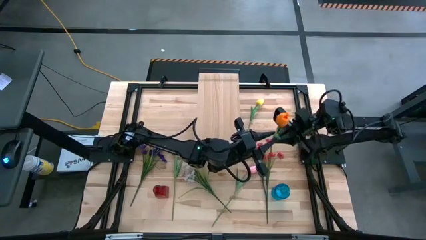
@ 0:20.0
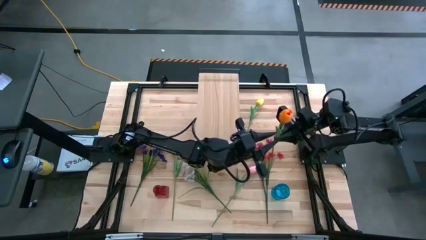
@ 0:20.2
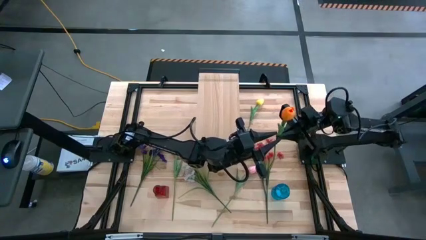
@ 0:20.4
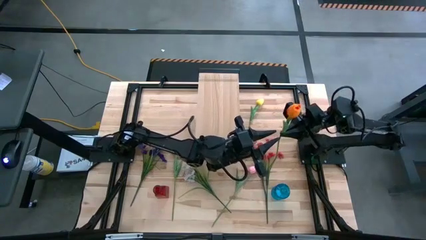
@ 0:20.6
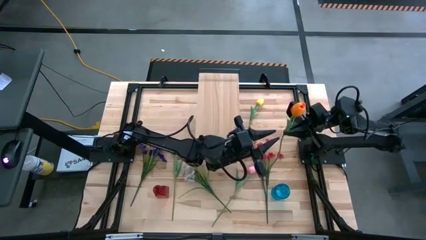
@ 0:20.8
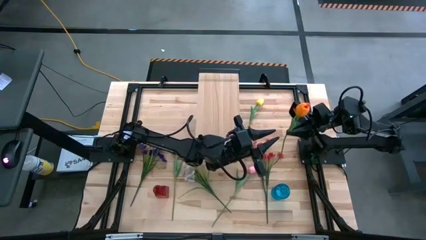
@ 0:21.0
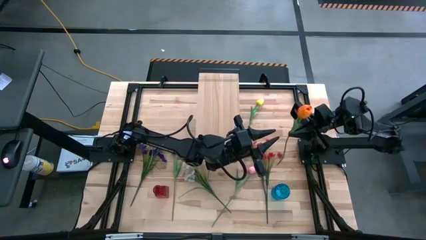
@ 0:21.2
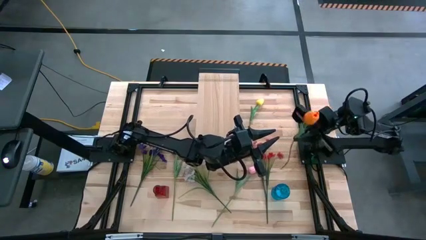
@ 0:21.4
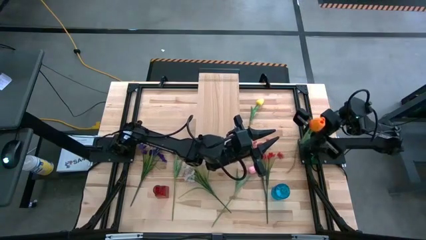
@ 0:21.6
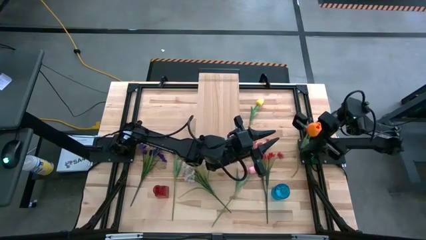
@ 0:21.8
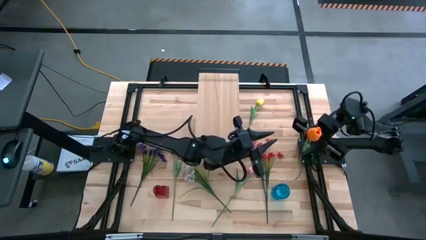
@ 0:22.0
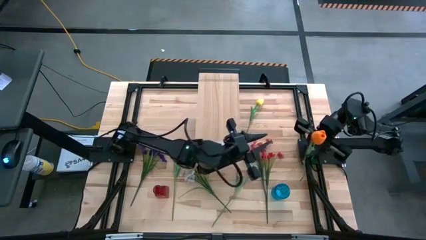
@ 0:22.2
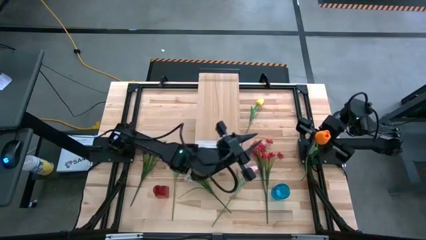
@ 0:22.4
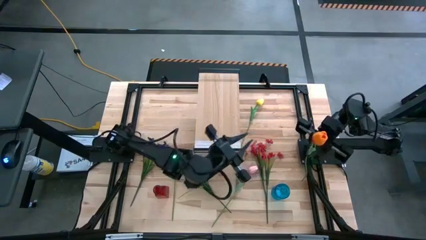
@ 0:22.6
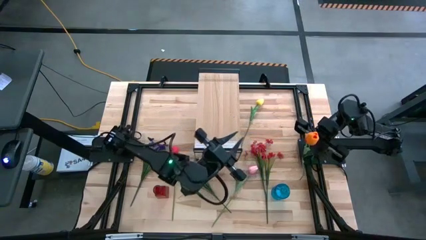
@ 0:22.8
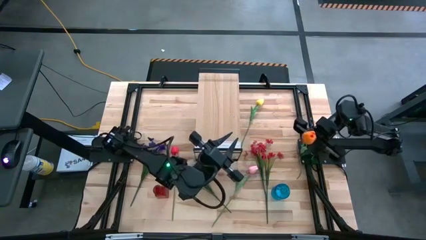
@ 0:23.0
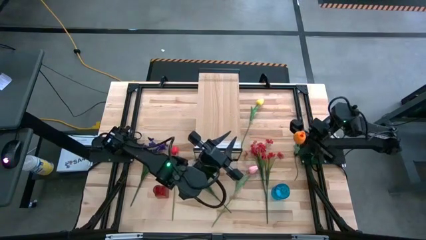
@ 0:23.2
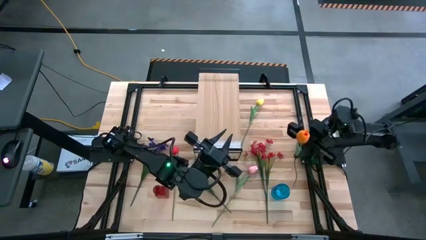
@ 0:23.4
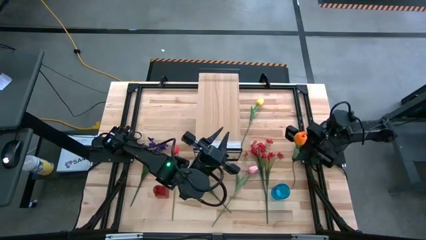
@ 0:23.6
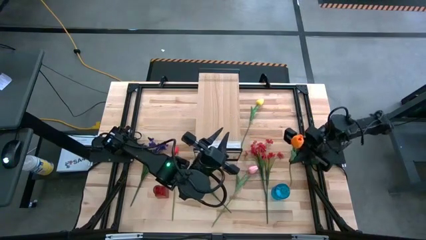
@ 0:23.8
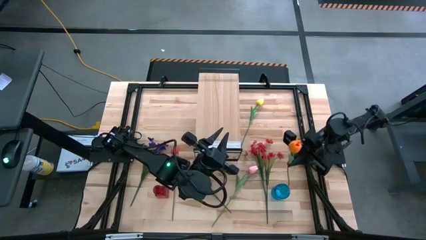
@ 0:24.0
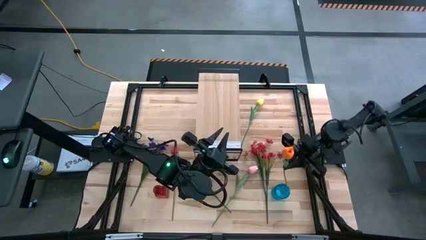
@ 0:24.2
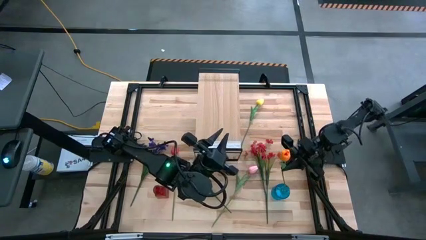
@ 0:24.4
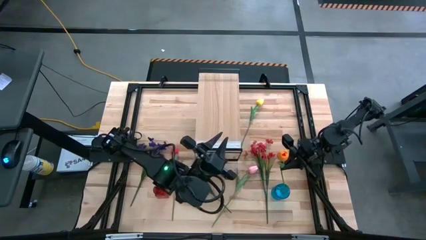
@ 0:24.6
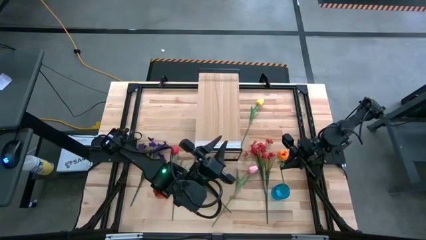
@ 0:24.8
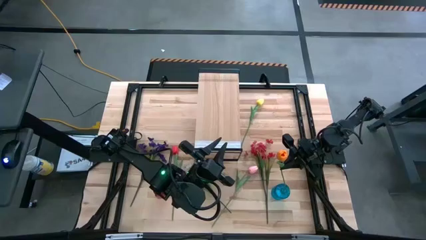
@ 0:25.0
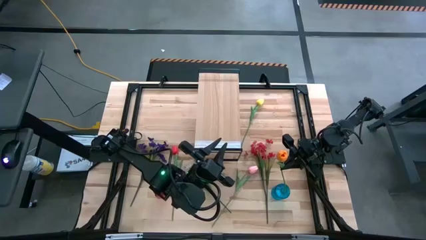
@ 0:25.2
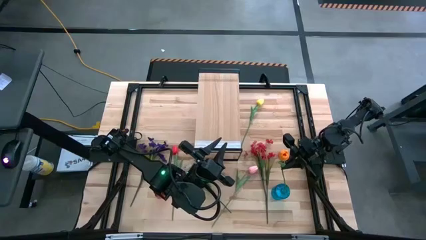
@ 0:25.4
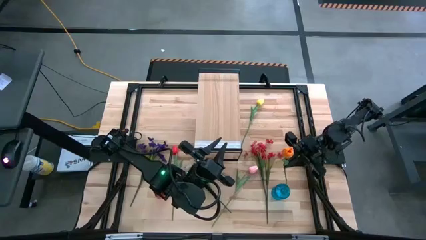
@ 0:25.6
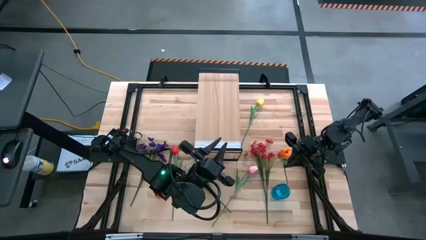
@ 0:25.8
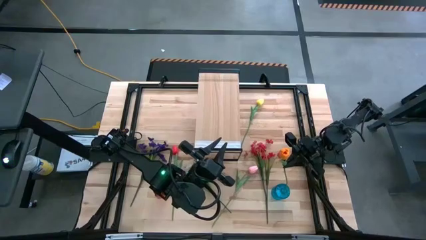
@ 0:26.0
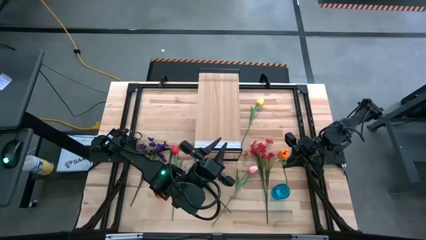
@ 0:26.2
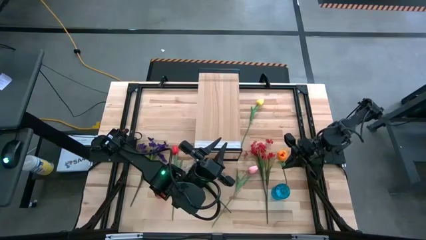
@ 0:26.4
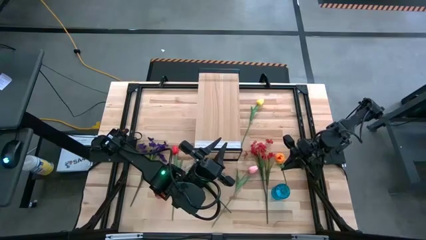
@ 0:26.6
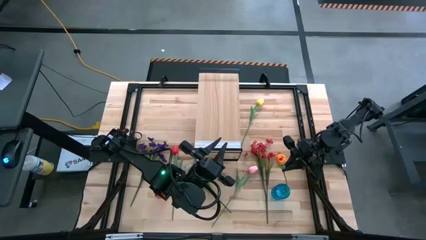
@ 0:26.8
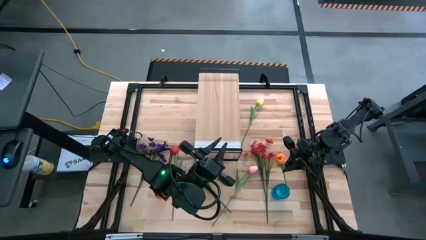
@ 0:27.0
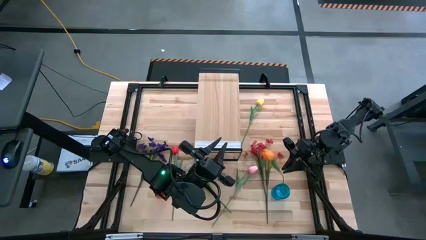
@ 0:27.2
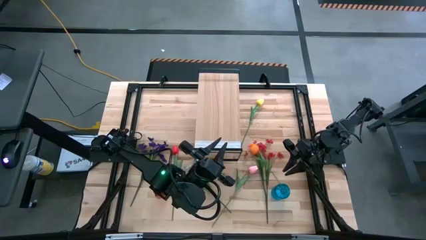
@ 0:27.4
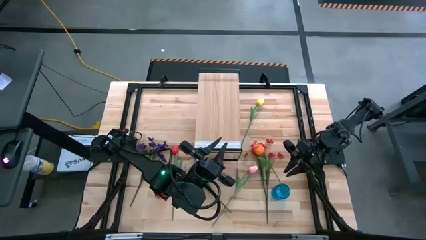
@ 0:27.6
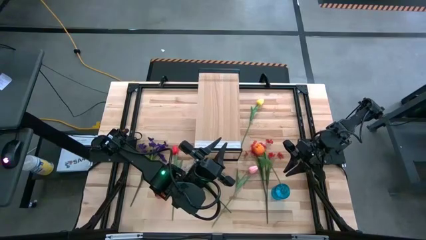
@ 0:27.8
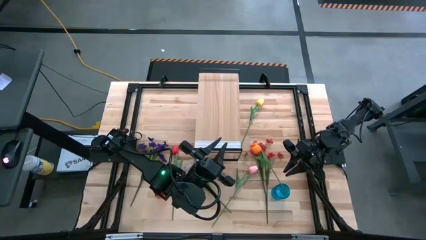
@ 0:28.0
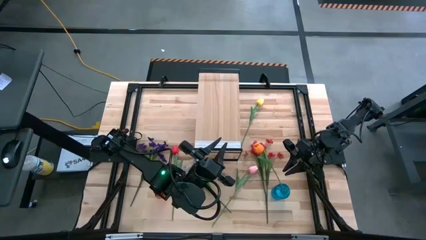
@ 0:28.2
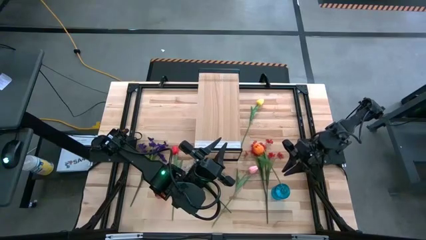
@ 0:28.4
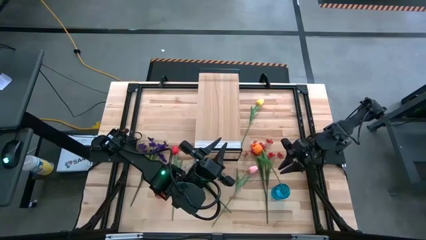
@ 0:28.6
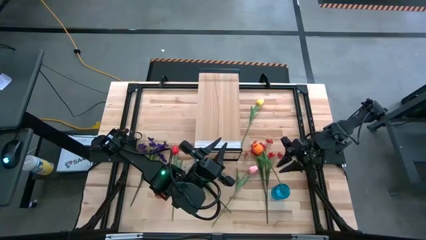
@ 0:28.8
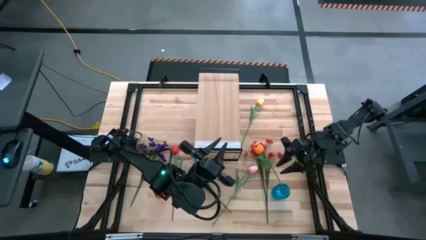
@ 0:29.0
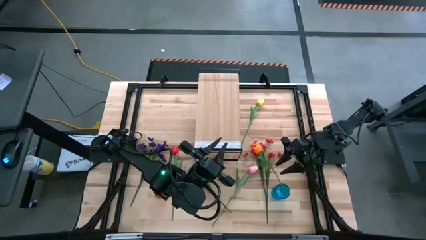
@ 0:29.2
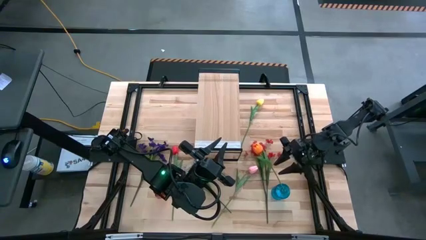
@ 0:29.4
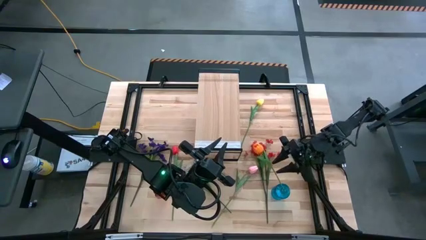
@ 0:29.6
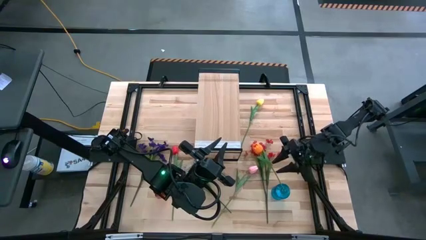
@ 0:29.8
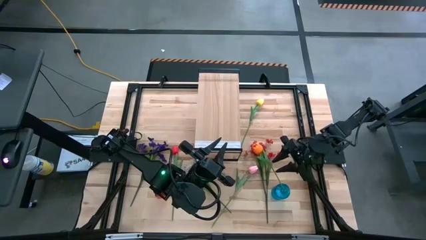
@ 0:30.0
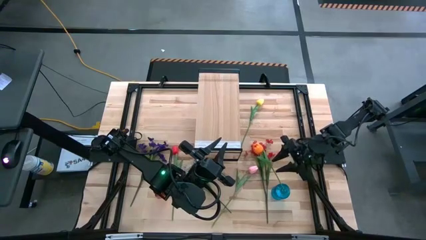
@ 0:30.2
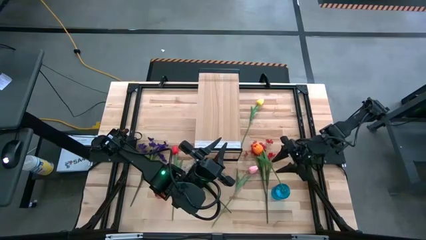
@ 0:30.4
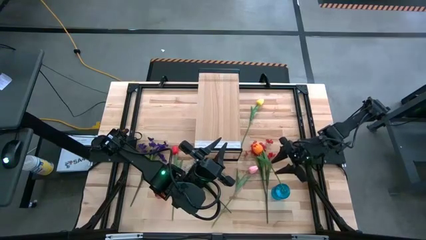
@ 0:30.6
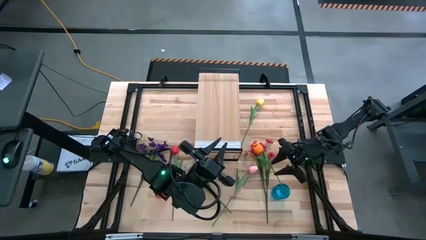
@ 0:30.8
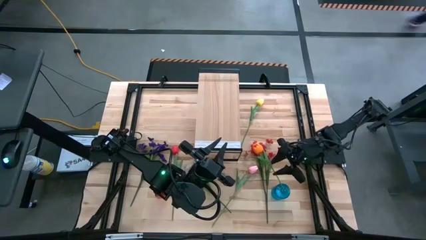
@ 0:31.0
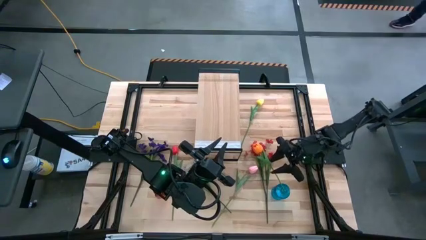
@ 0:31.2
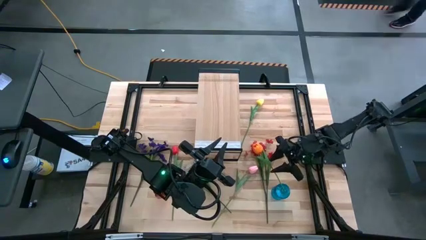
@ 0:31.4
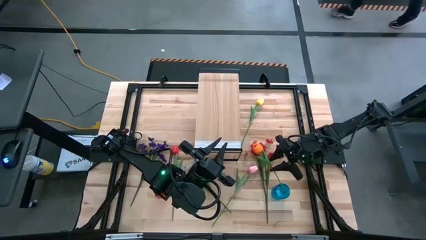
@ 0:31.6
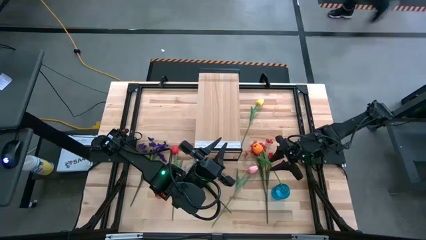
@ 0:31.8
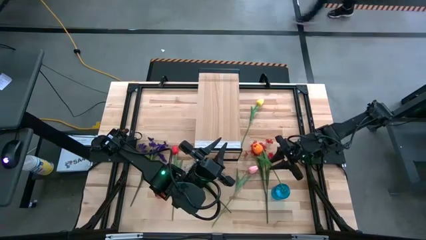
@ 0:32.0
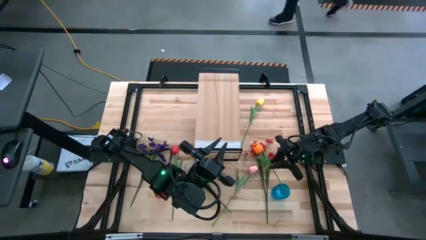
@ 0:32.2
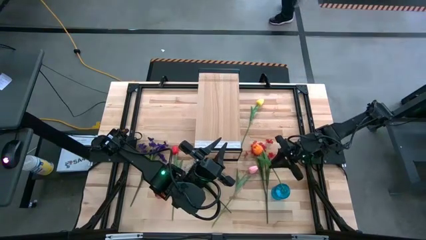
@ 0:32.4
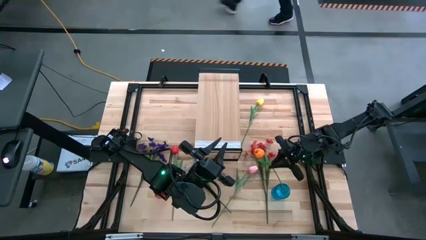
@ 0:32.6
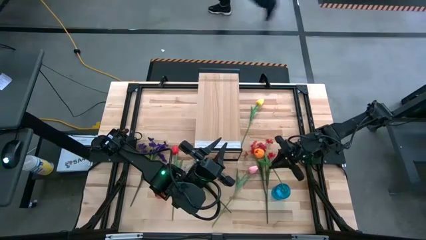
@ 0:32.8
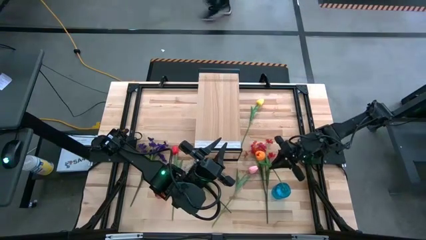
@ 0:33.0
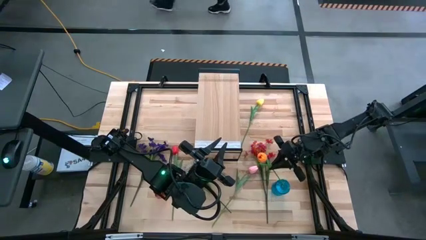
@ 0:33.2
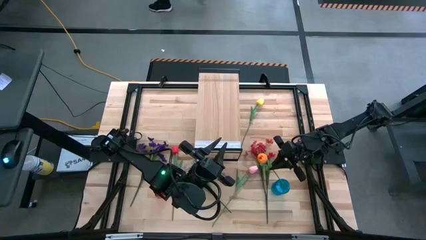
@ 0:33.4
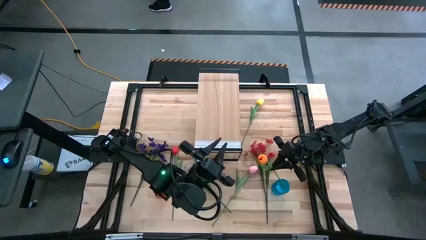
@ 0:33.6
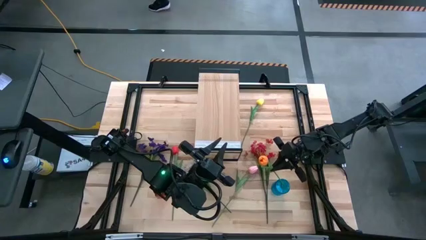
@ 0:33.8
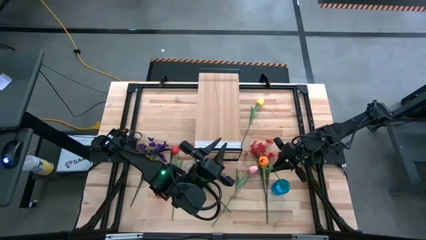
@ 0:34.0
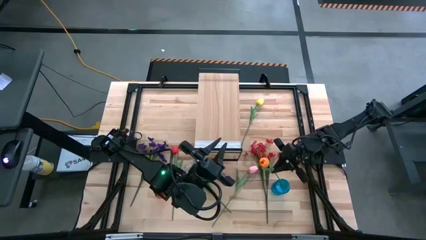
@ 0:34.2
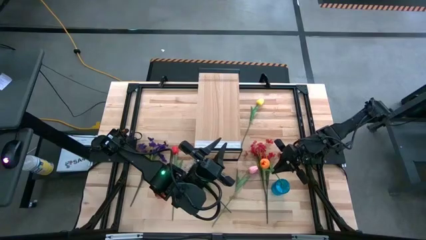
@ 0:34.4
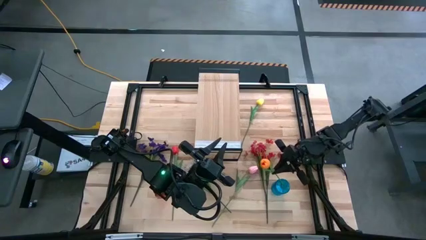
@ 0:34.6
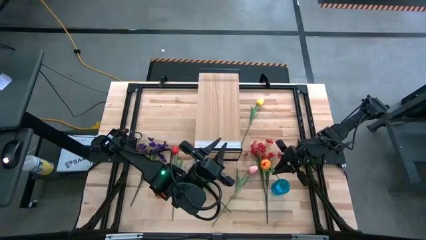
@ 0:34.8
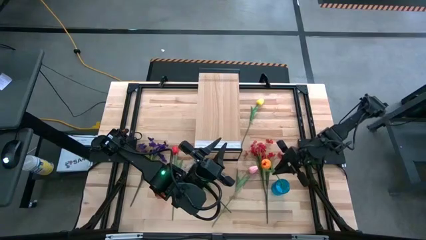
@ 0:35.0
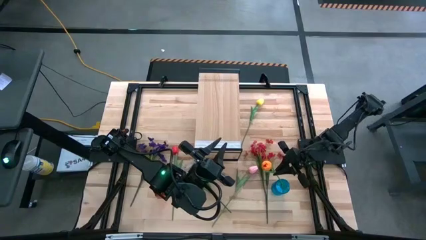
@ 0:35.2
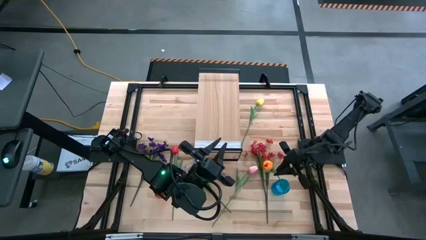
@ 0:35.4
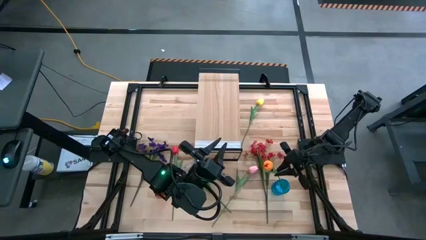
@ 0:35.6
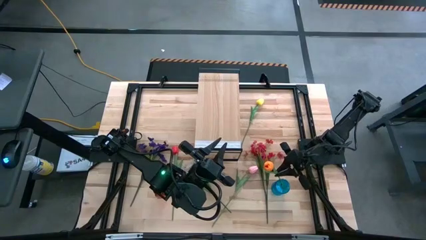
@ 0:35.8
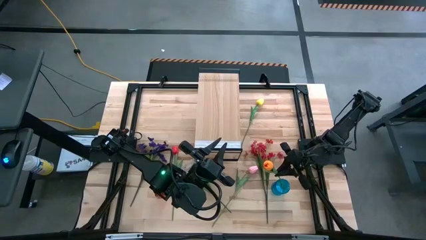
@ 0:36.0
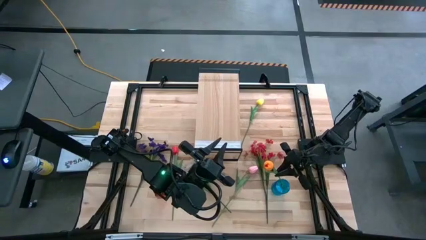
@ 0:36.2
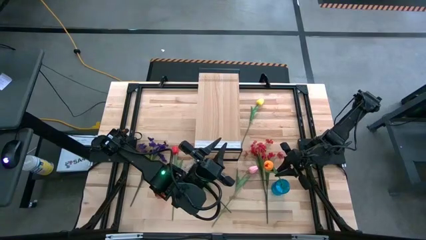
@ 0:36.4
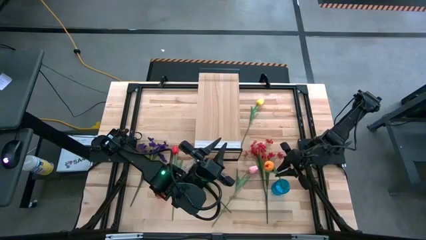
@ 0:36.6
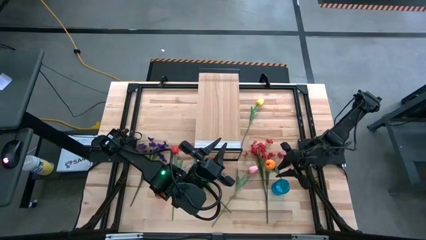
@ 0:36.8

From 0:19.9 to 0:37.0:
Task: Pick and place flowers into a vace then onto a shelf
Put the orange tulip into the blue vase
